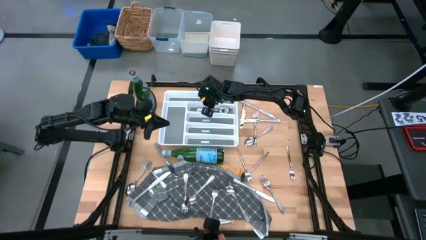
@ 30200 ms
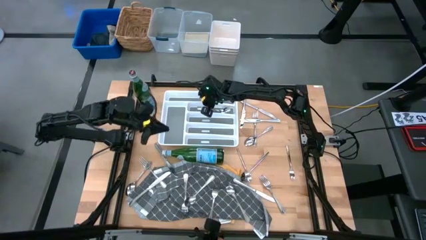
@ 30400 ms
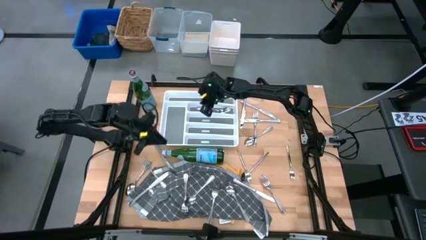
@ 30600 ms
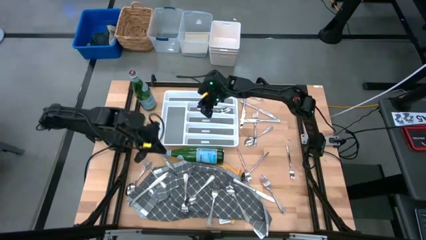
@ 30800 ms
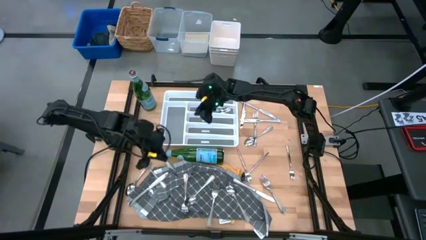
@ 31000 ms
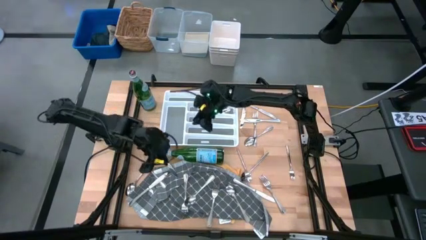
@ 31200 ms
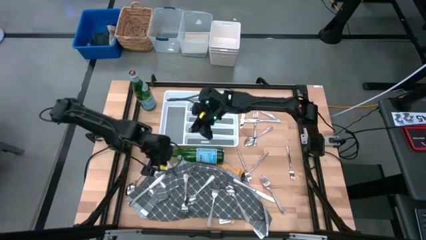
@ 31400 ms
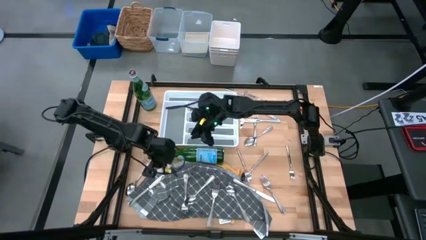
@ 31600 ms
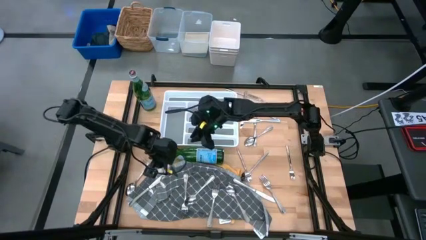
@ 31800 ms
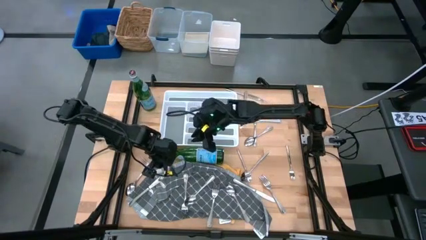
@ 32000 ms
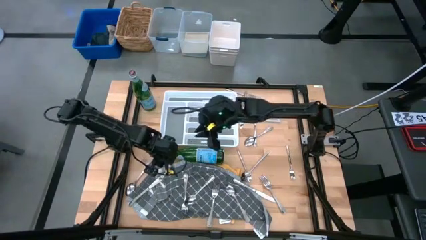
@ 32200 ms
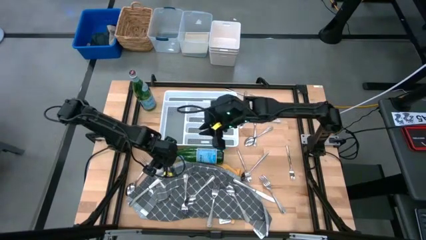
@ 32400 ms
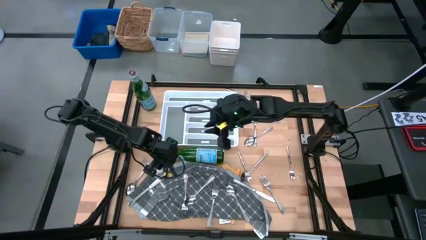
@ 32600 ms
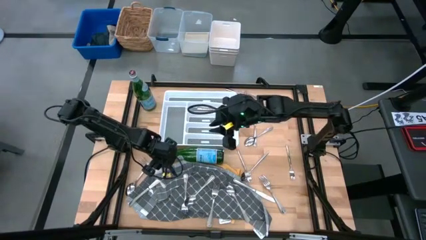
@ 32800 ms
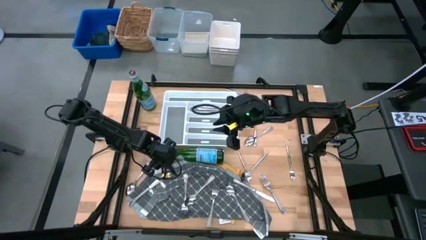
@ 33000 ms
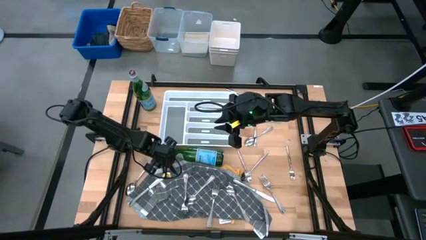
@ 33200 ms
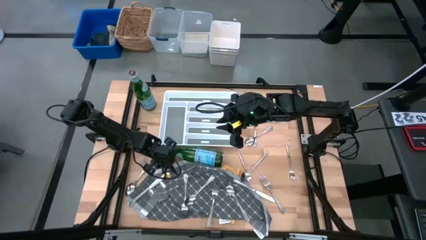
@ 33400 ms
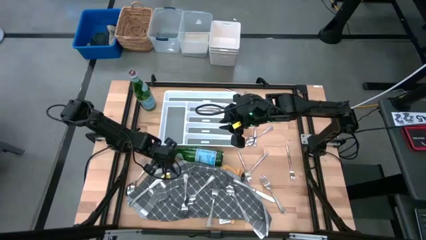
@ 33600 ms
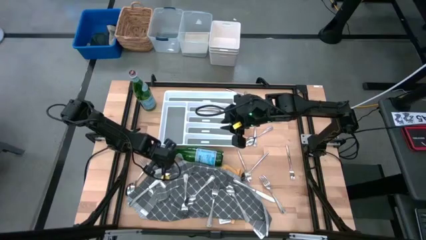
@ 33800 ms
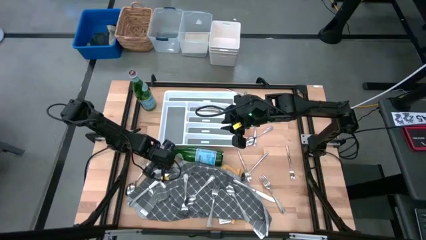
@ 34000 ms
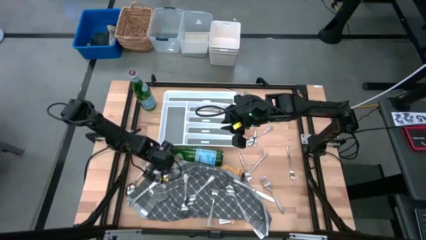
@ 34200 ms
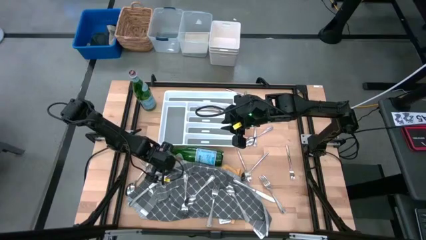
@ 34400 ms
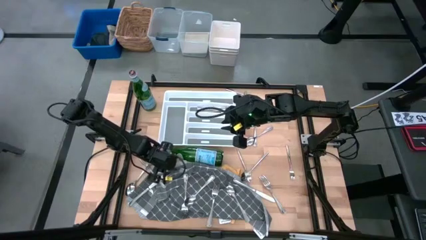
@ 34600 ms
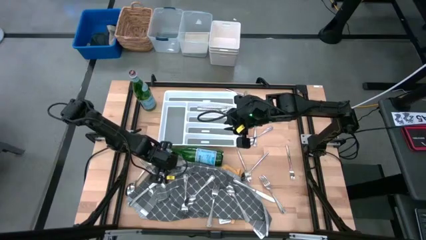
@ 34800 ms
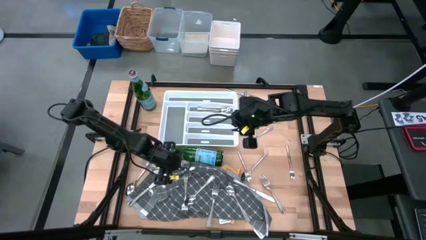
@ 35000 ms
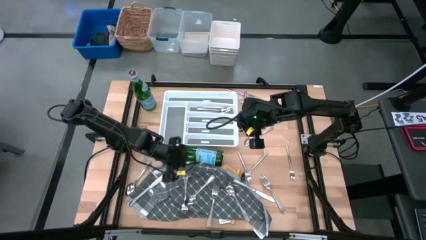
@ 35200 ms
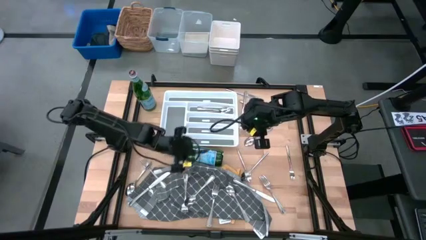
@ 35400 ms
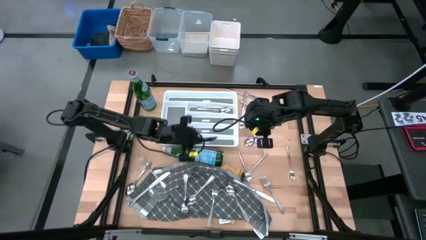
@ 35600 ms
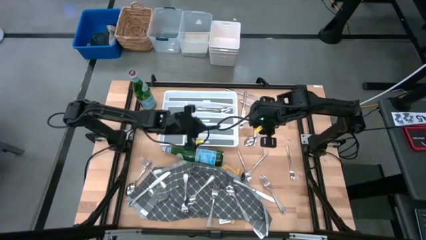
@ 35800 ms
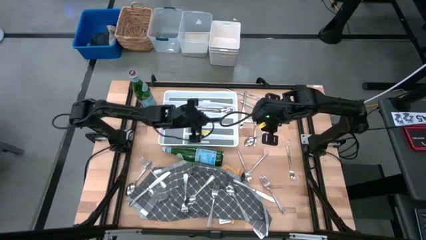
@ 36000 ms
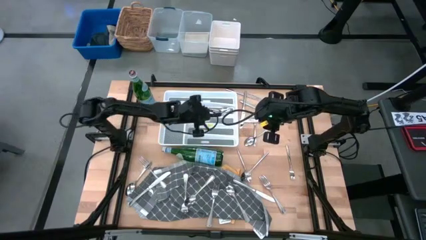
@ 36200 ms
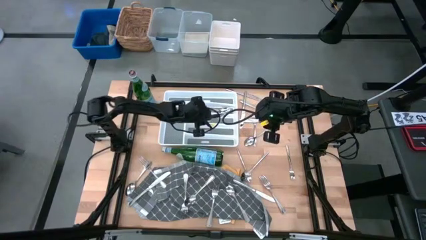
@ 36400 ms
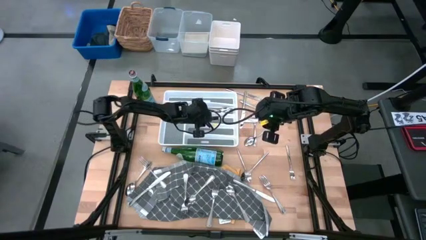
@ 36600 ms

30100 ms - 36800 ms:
Task: Sort silverware
Put the silver table knife into the silverware tray

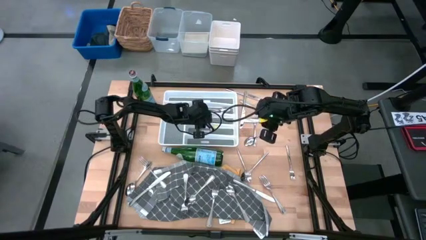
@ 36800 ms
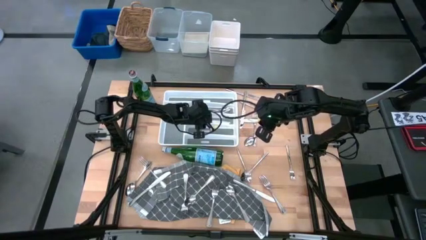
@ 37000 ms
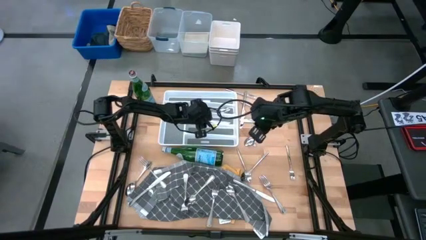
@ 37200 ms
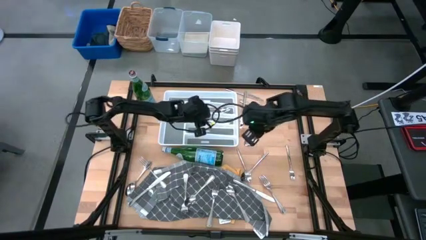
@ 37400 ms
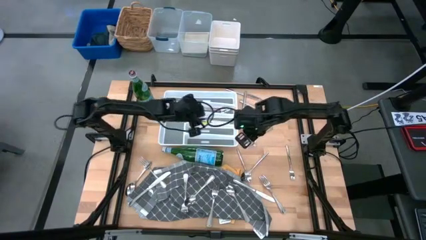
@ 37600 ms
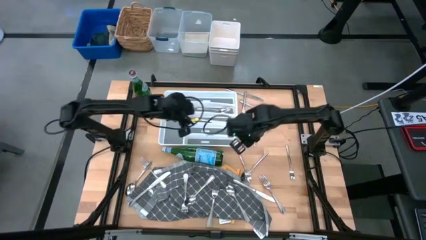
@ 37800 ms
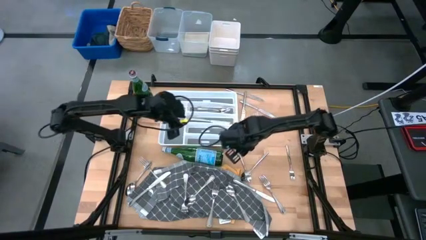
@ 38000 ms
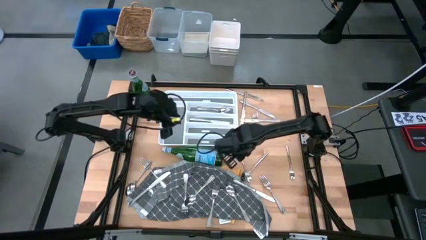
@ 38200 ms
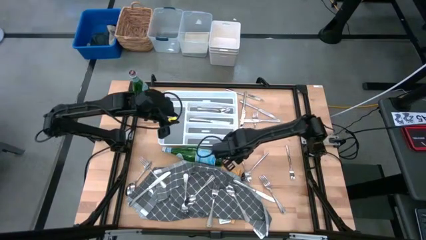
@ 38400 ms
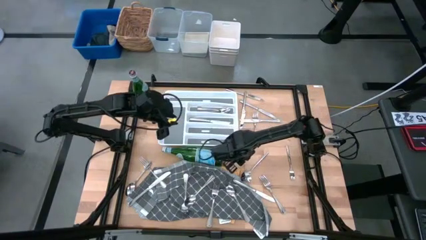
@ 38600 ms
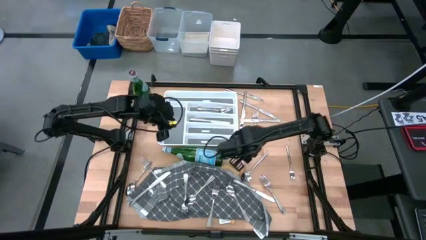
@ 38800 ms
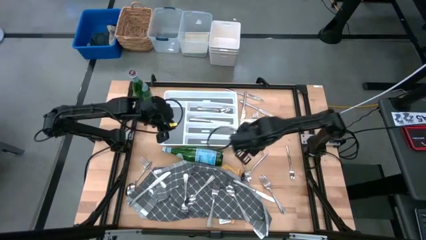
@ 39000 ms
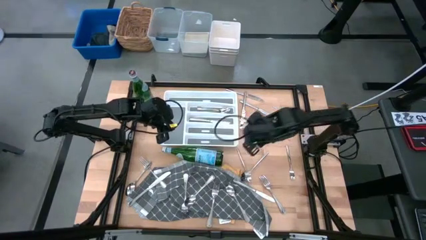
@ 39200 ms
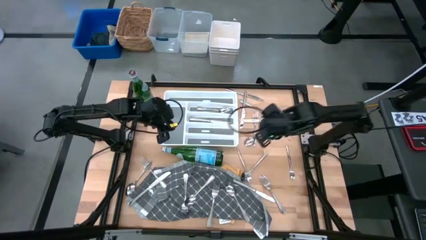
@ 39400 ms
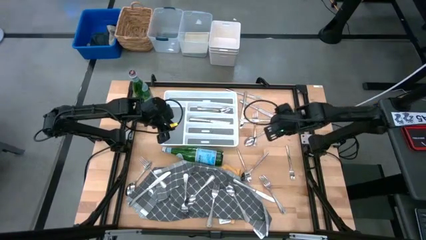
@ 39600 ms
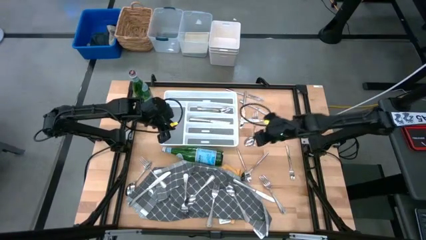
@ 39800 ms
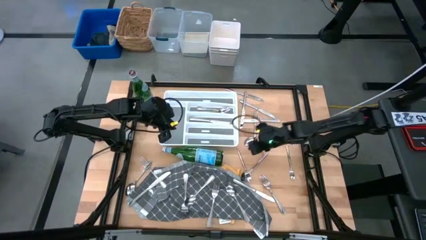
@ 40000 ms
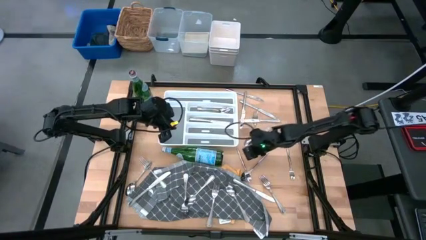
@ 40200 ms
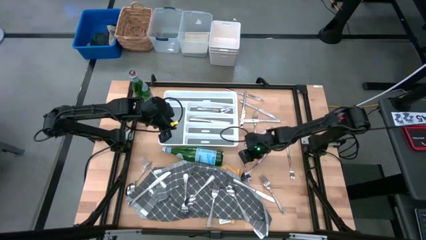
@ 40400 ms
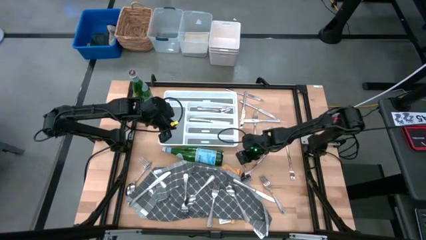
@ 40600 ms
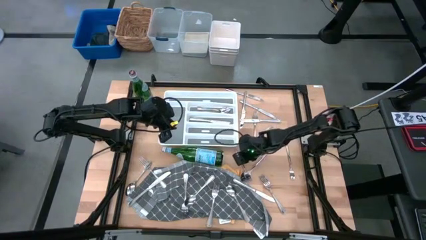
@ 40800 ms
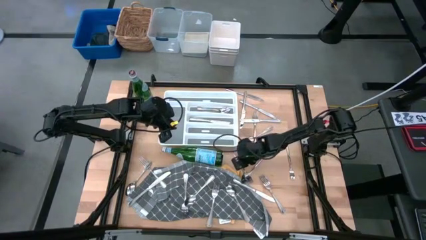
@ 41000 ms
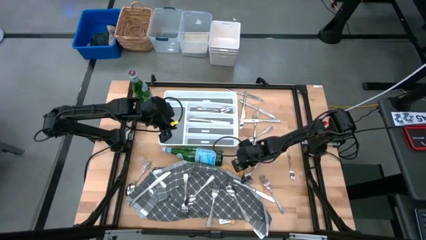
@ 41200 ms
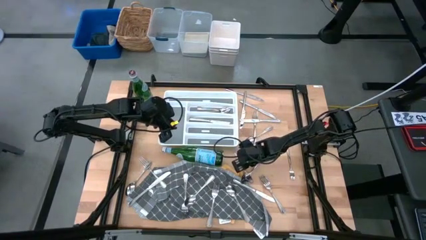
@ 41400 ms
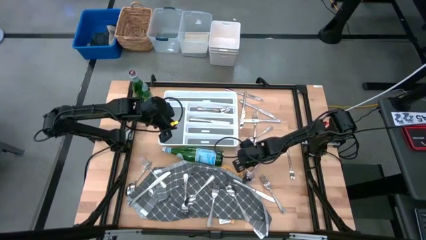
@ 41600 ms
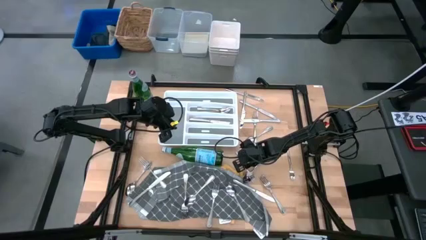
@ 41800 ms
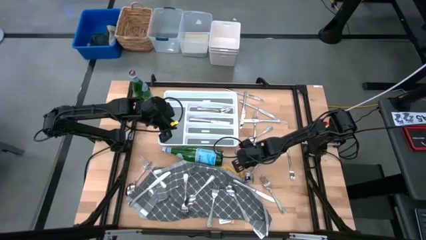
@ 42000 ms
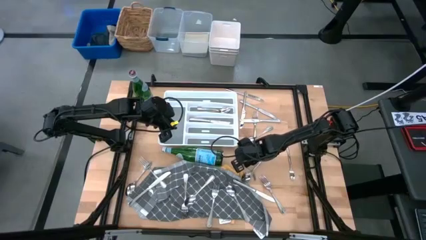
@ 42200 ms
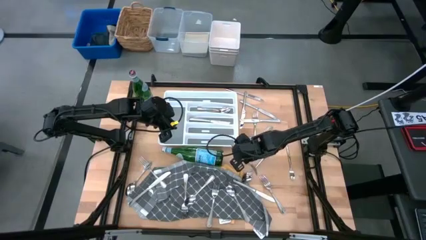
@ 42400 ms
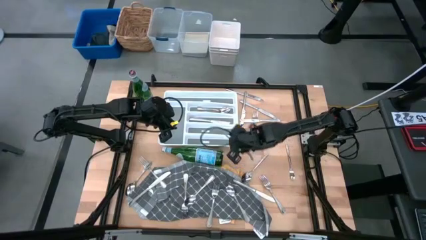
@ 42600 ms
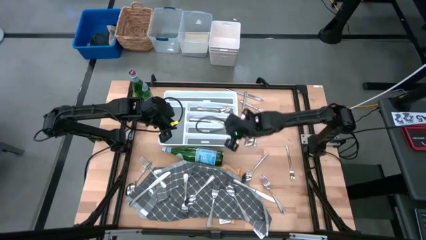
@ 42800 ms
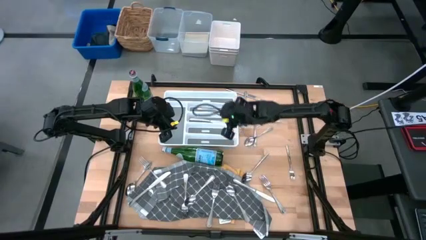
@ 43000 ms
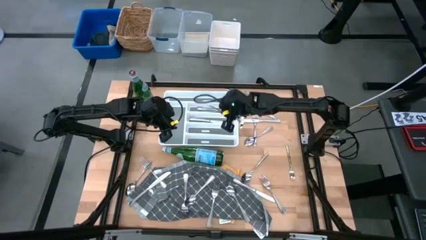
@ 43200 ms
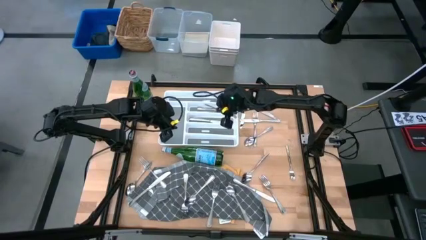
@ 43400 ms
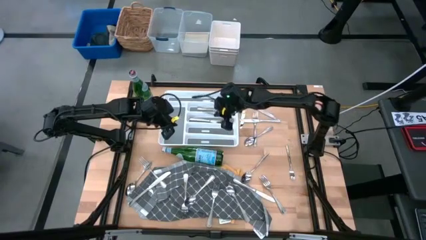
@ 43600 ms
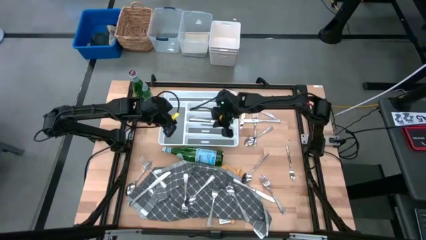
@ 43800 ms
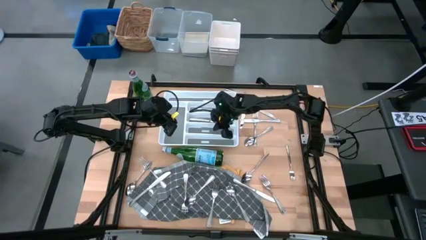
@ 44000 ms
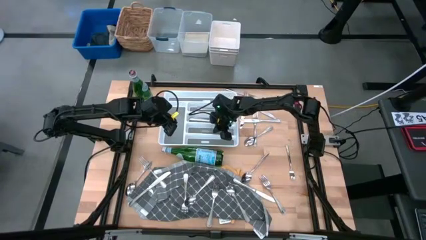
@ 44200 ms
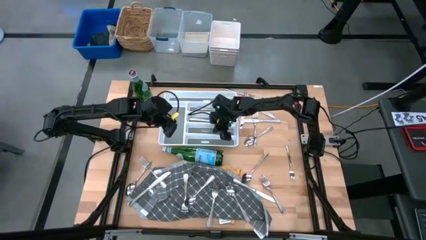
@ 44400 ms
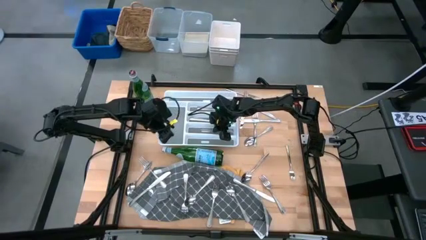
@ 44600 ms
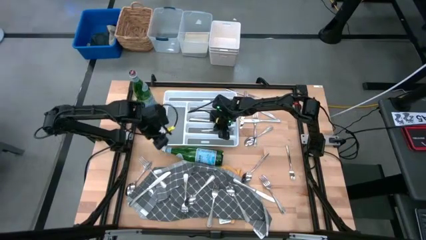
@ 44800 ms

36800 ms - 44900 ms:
Put the silver fork into the silverware tray
